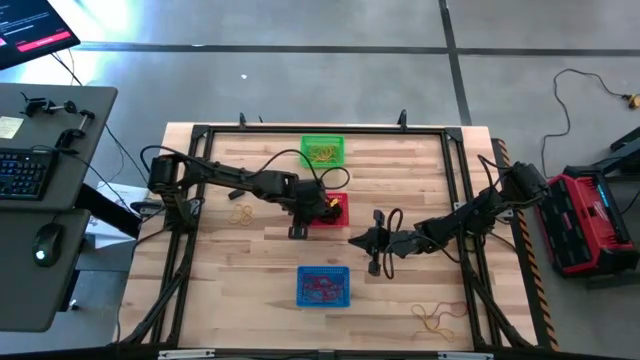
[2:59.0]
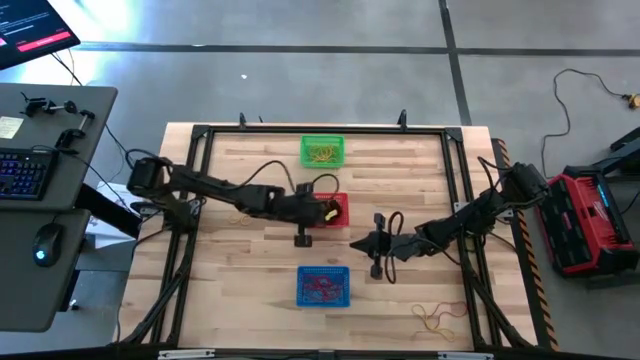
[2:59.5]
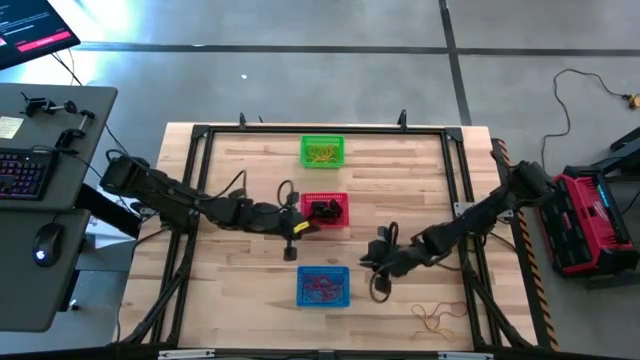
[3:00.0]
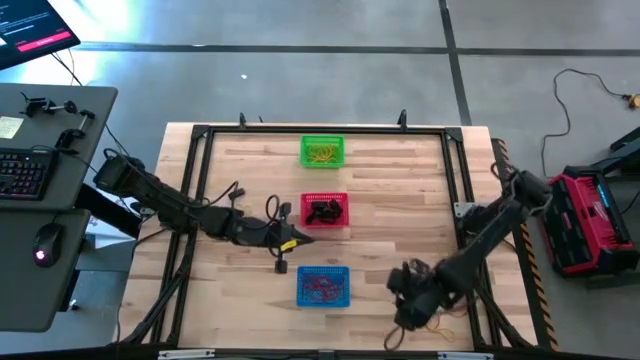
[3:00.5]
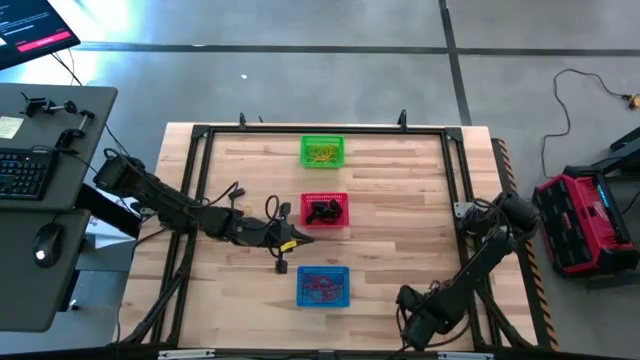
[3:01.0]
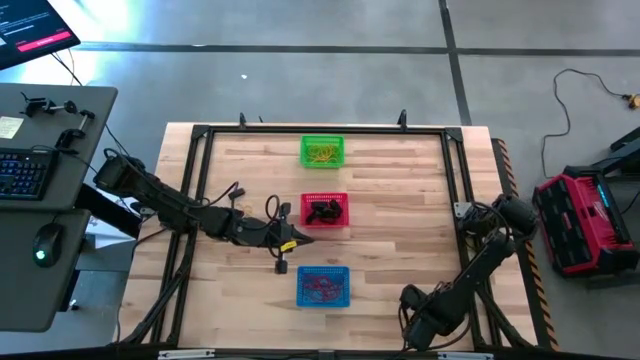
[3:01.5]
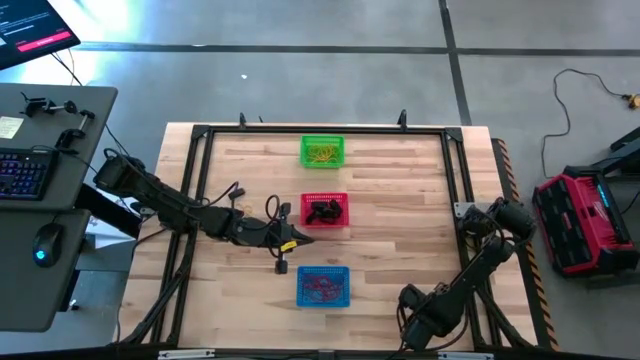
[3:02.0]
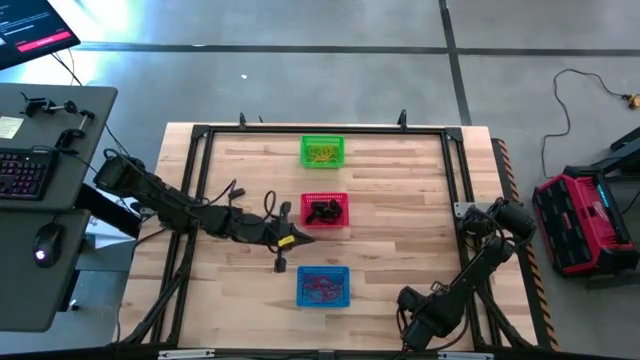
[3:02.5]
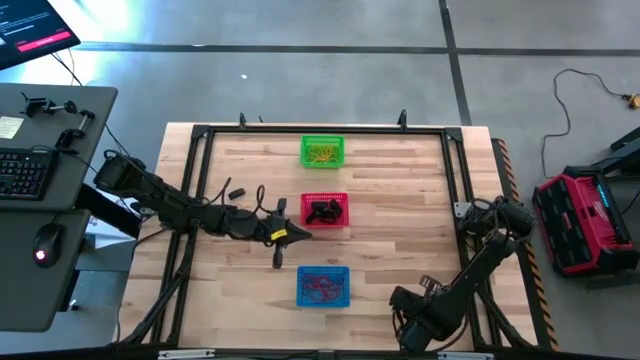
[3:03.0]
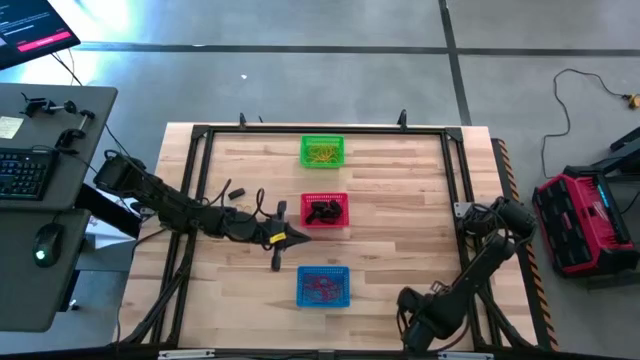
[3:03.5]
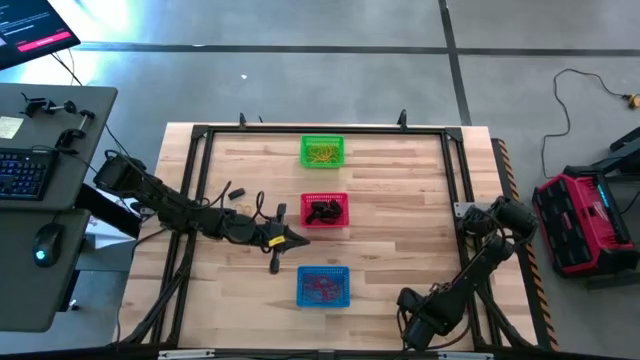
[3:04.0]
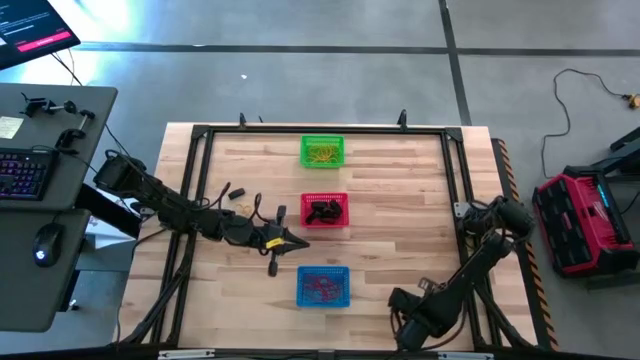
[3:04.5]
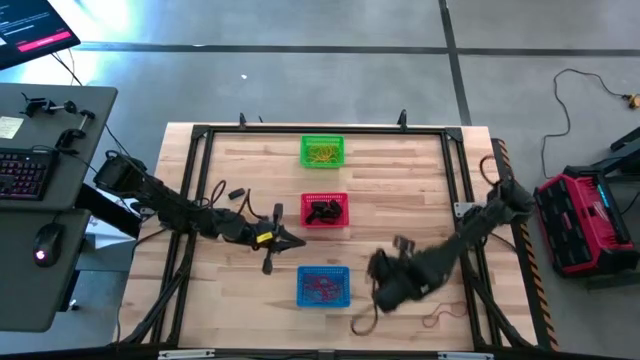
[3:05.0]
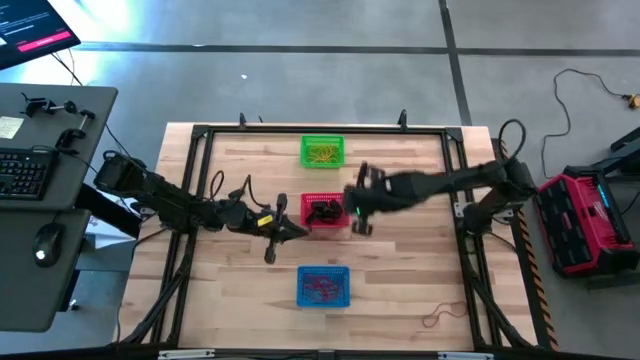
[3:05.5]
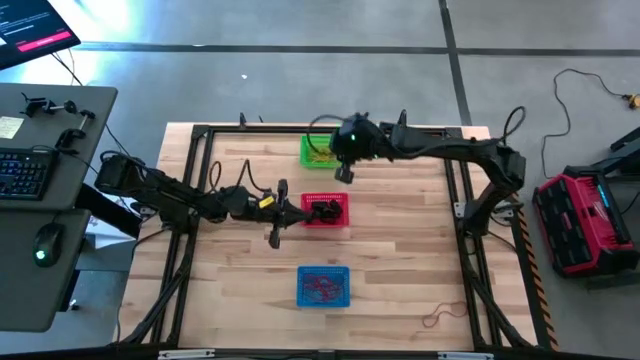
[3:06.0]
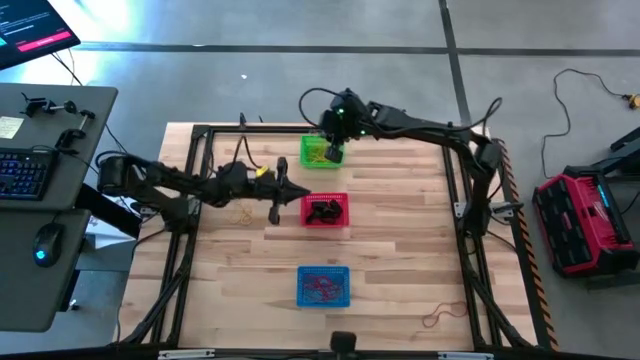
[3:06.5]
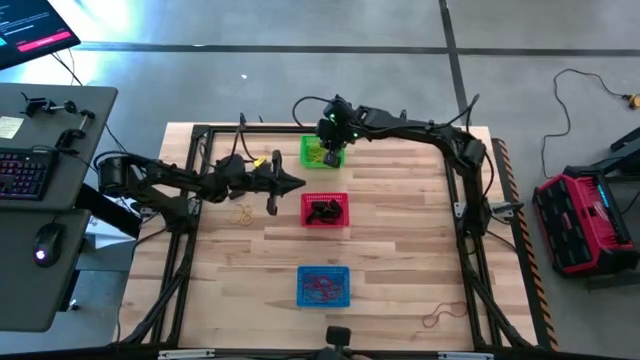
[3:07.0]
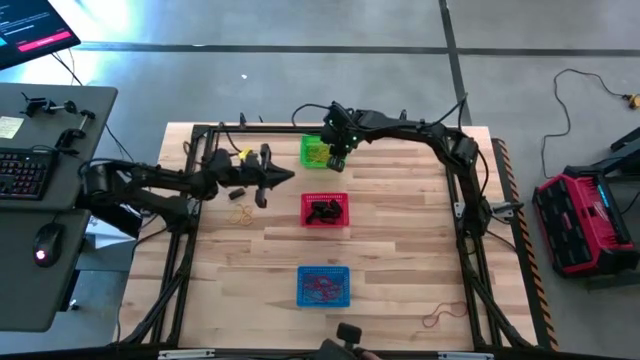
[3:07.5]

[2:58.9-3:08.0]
Task: Sort rubber bands into baskets
Put the yellow rubber band into the green bin

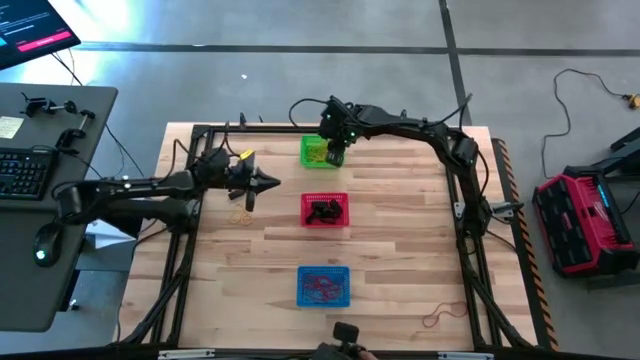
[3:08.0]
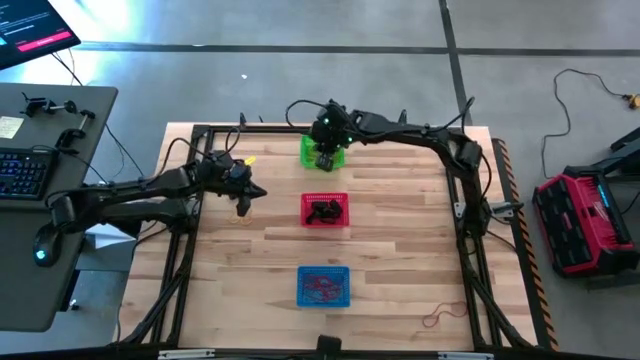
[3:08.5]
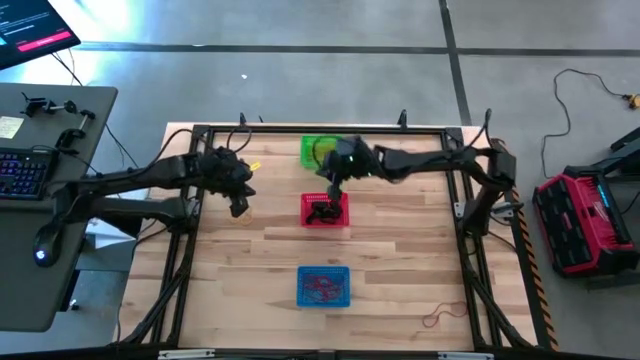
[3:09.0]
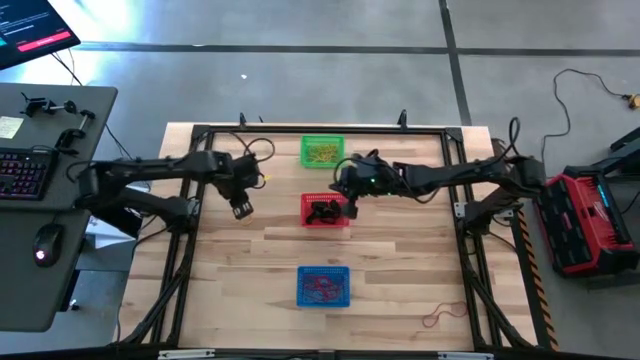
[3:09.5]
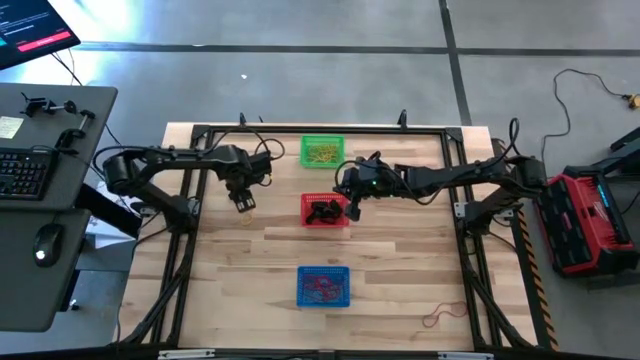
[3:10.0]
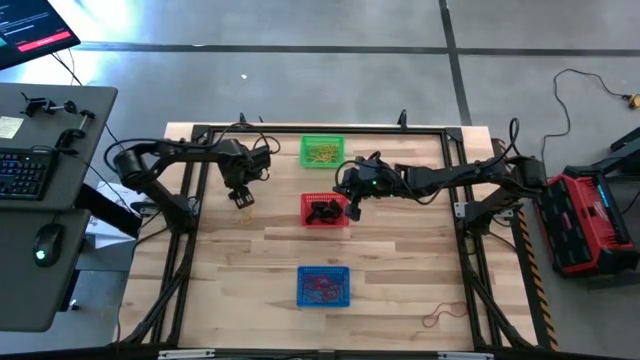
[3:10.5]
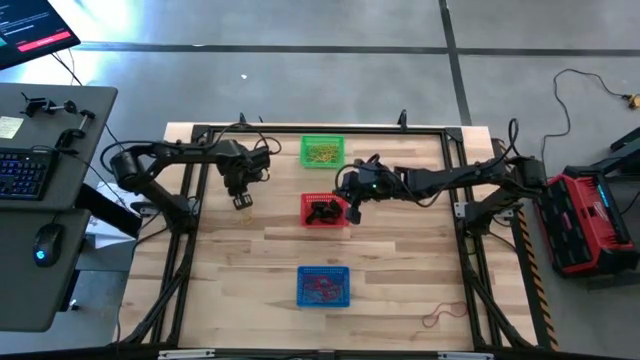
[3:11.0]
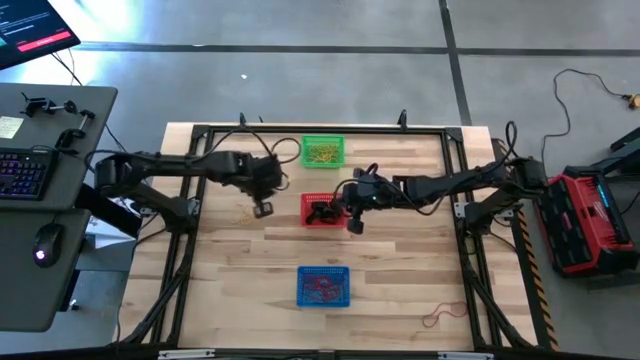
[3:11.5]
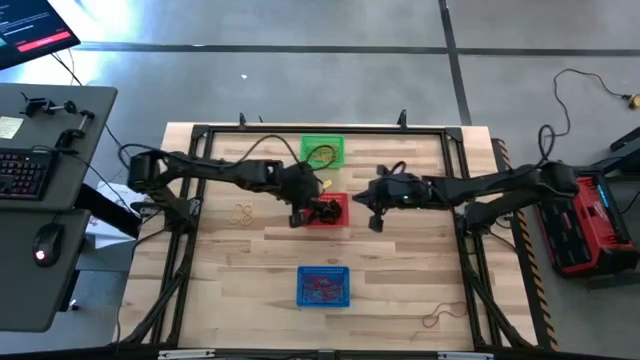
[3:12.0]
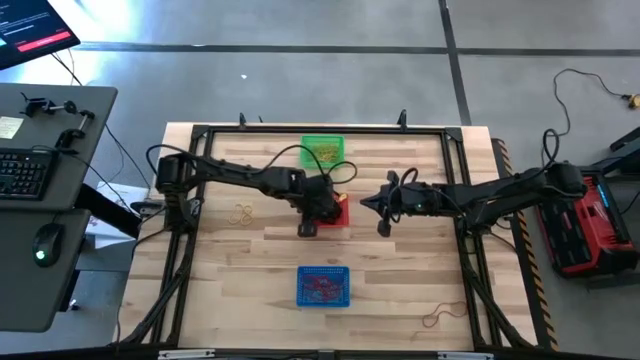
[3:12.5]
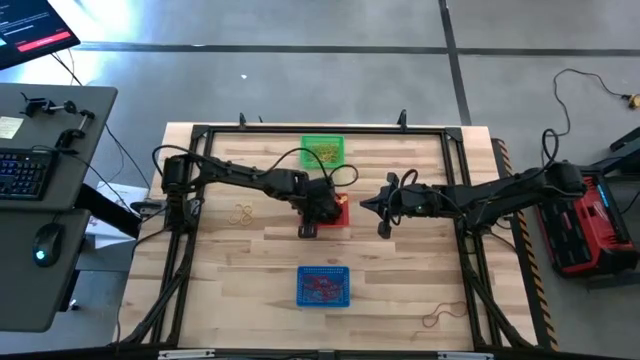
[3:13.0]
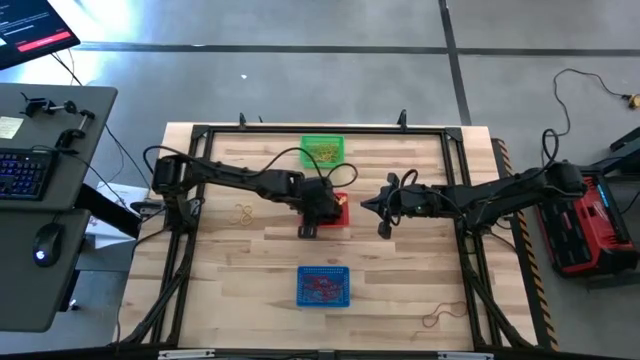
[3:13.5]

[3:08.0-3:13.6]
Put the black rubber band into the red bin

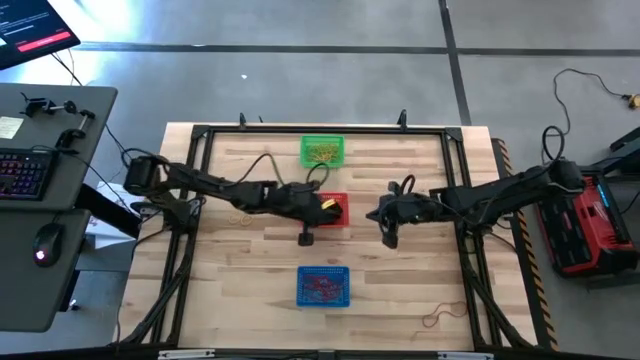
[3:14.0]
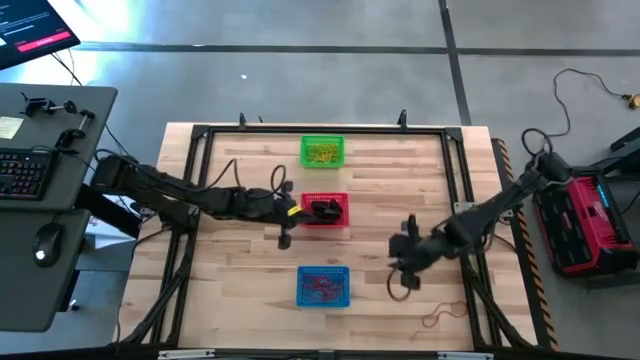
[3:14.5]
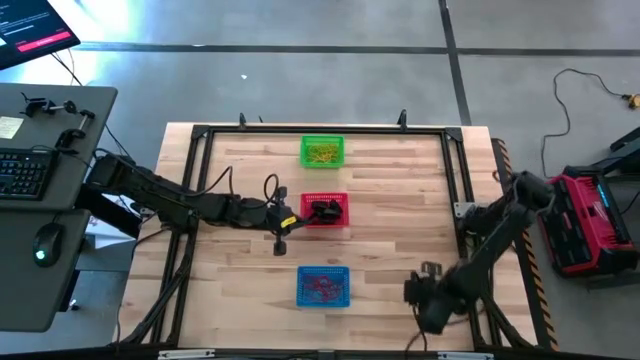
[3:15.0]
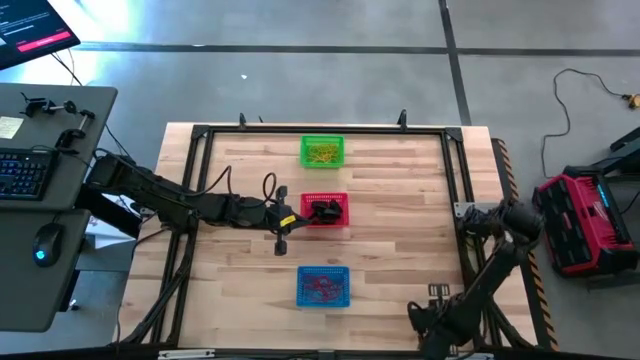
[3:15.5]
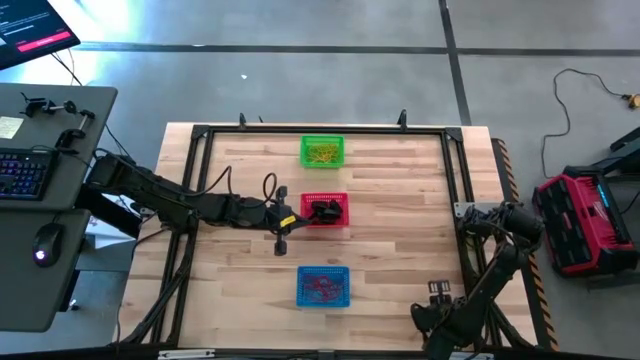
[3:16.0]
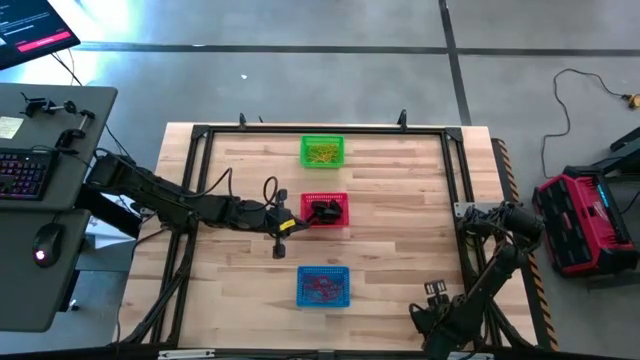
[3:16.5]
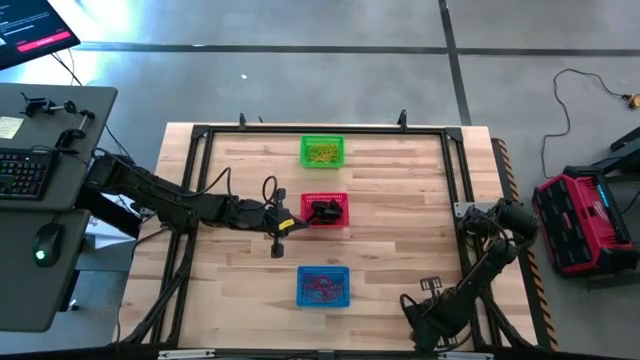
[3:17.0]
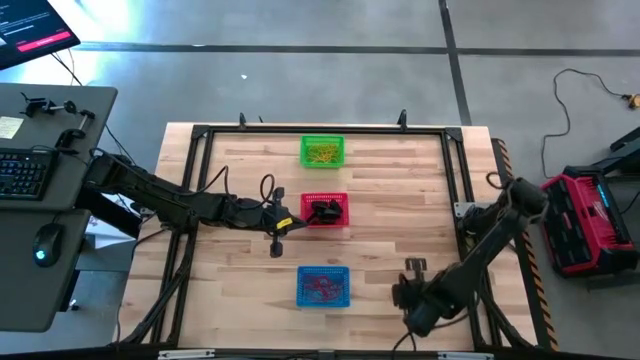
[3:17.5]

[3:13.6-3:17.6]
Put the red rubber band into the blue bin

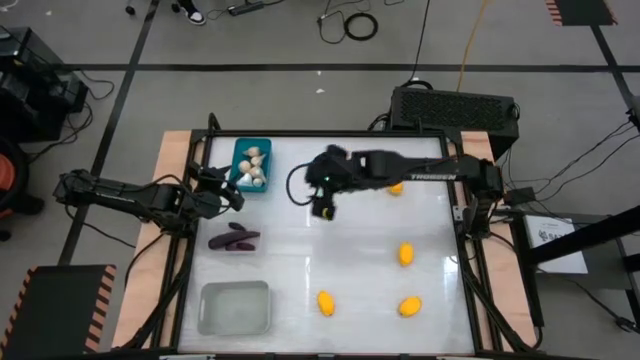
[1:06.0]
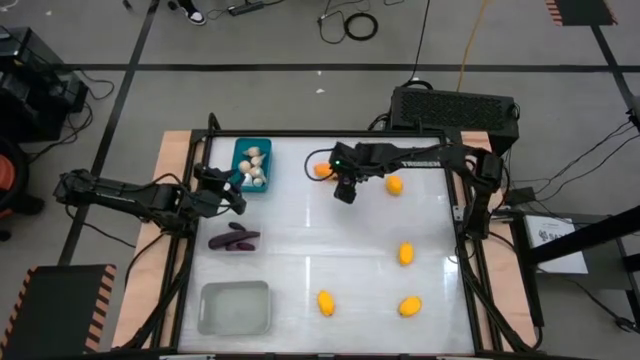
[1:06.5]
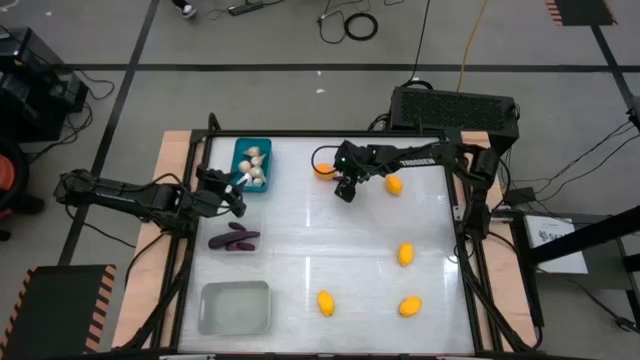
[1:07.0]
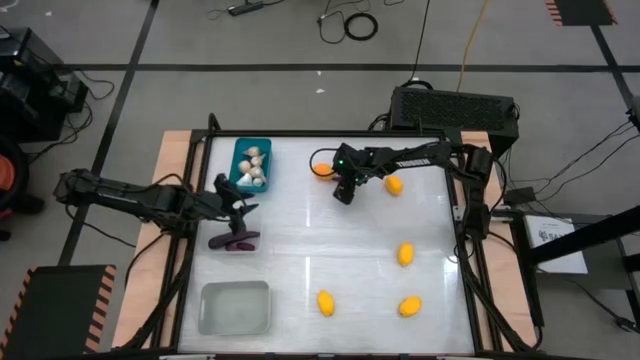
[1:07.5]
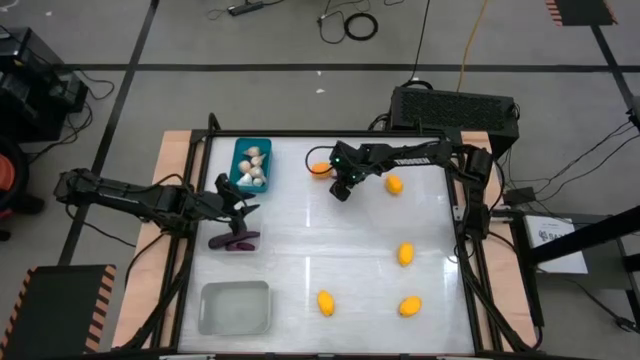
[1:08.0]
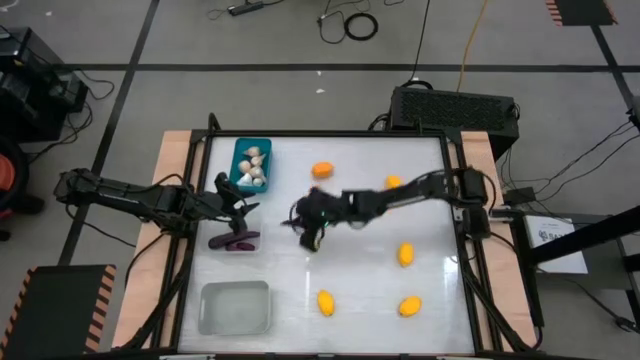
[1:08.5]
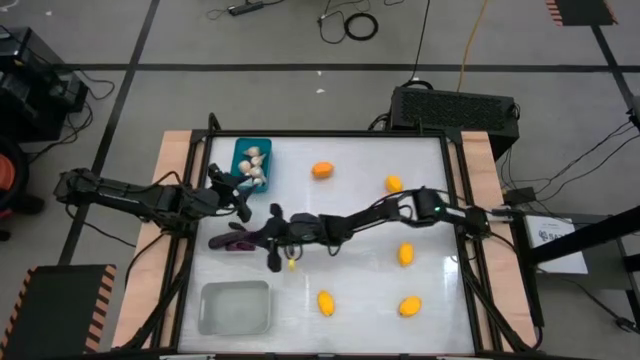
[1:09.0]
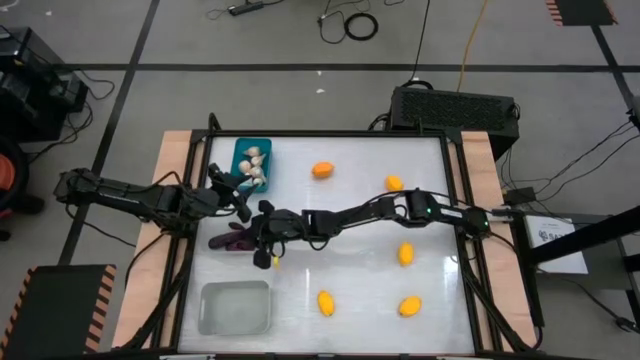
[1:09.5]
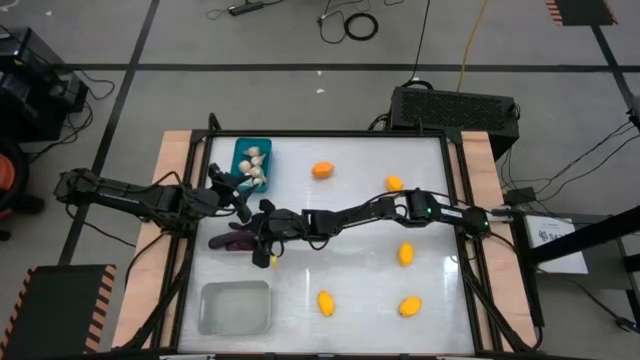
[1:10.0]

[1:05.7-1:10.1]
Task: Sort produce into baskets
Put the eggplant into the transparent bin
